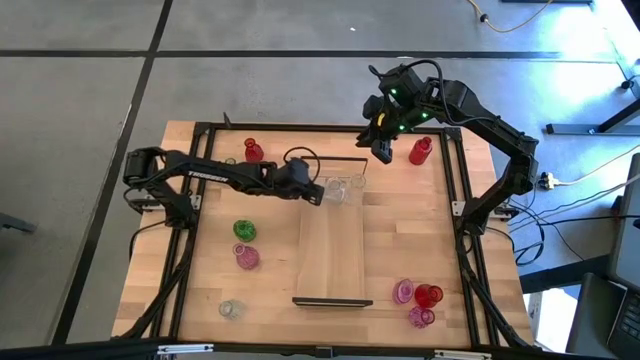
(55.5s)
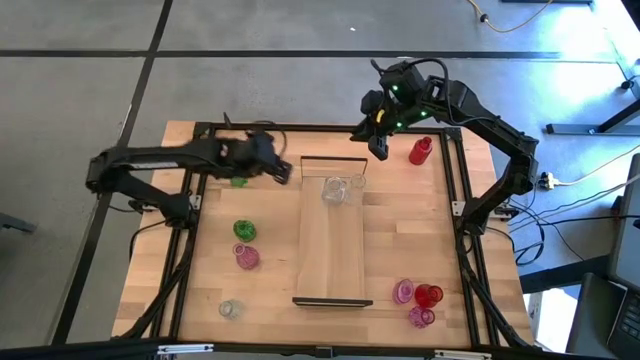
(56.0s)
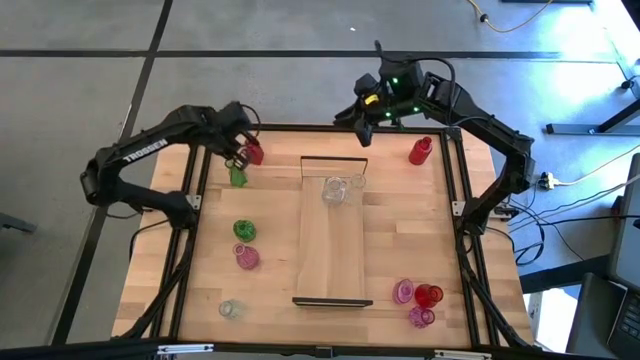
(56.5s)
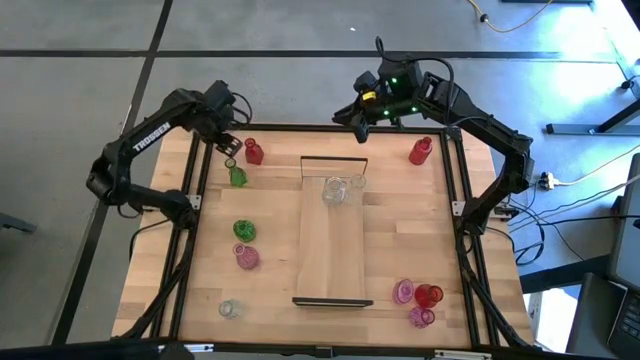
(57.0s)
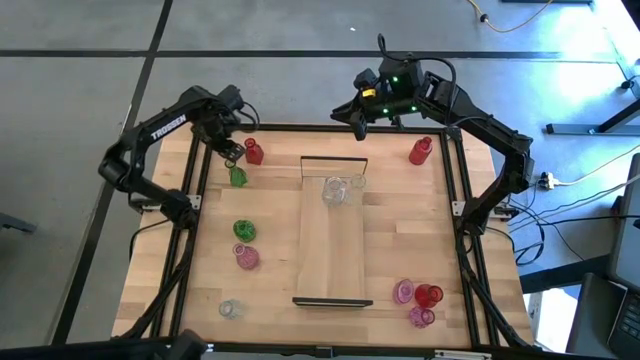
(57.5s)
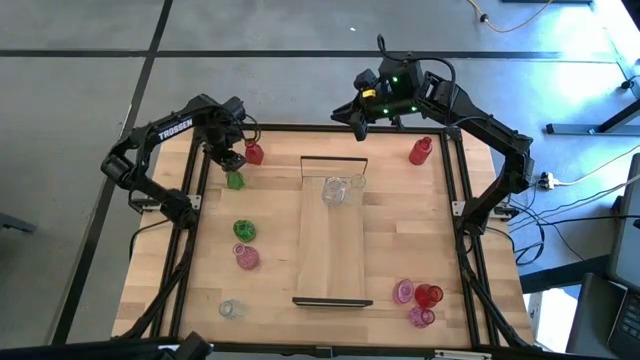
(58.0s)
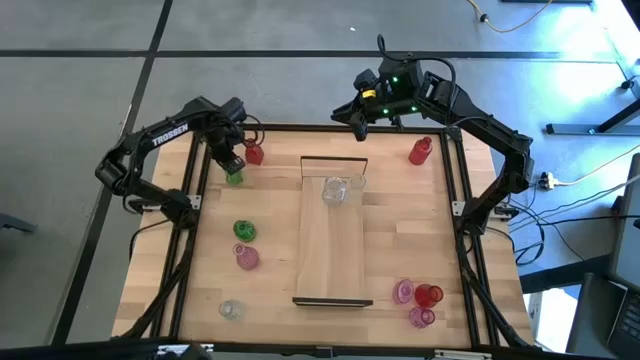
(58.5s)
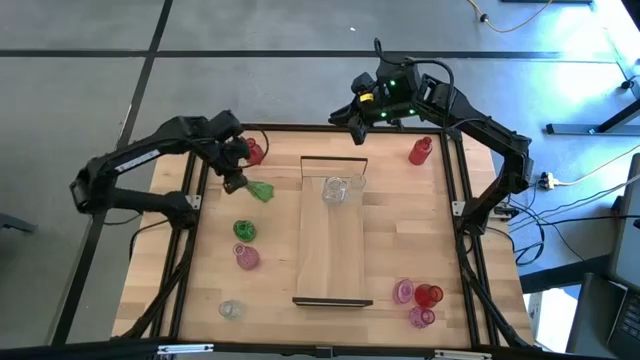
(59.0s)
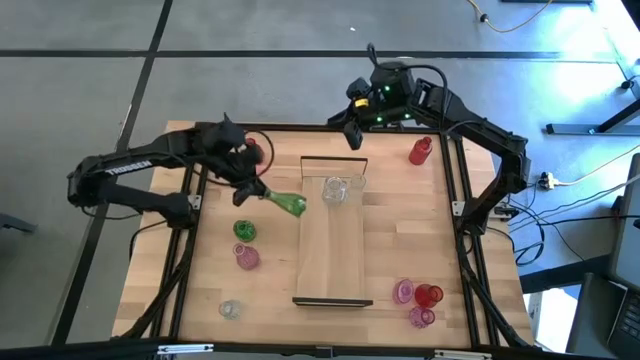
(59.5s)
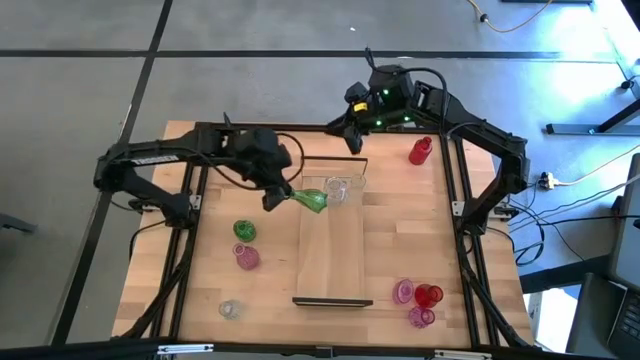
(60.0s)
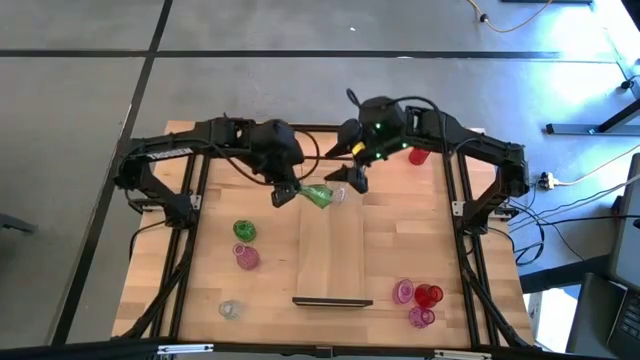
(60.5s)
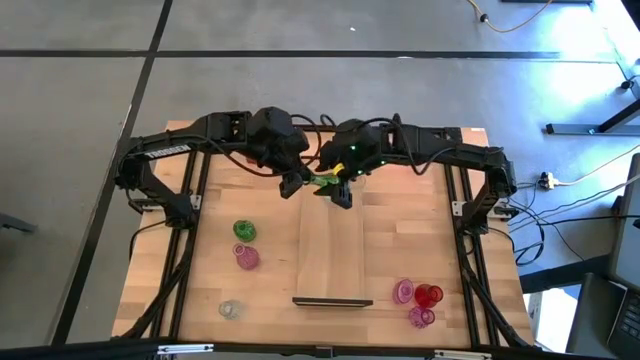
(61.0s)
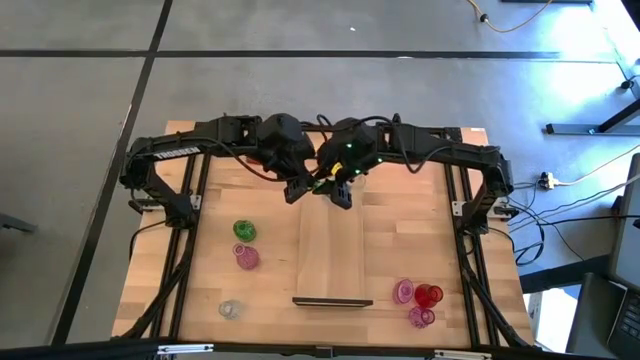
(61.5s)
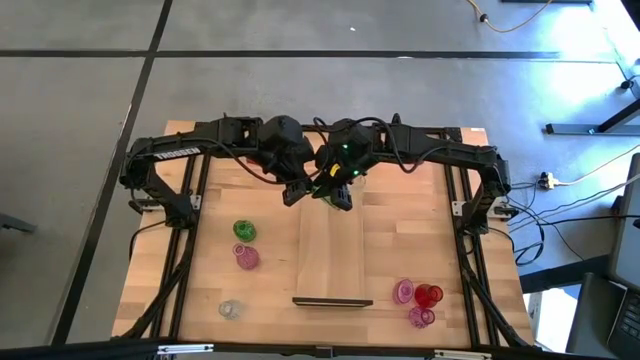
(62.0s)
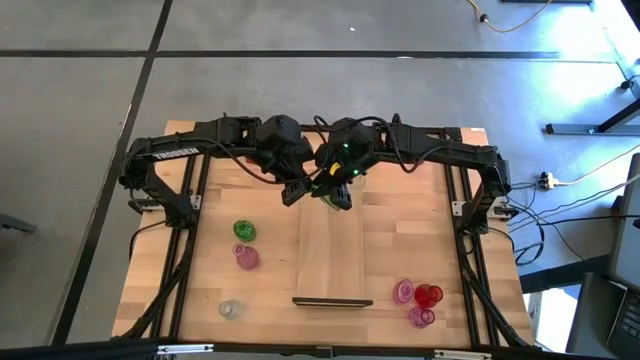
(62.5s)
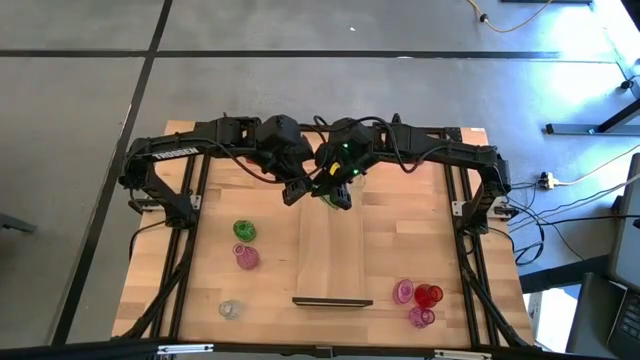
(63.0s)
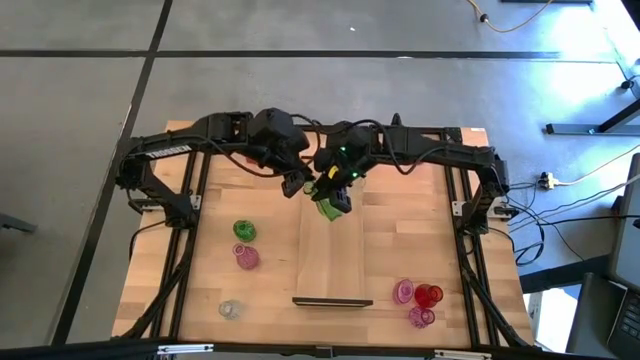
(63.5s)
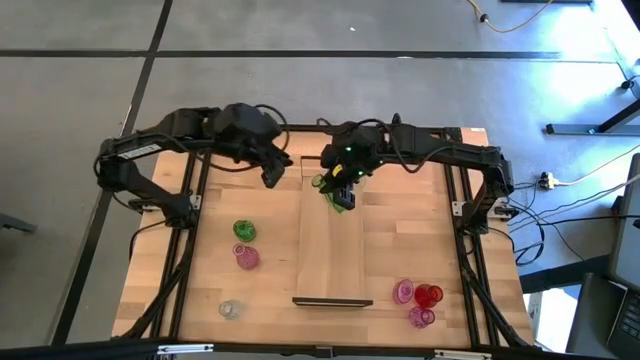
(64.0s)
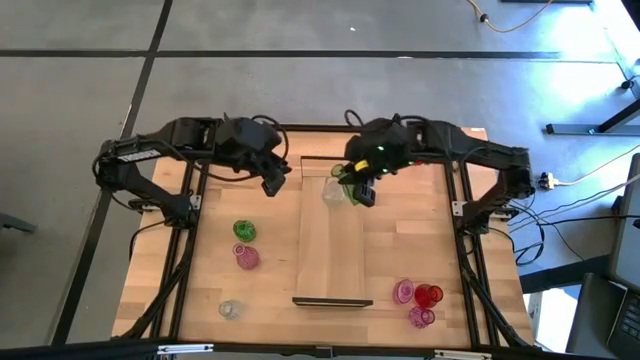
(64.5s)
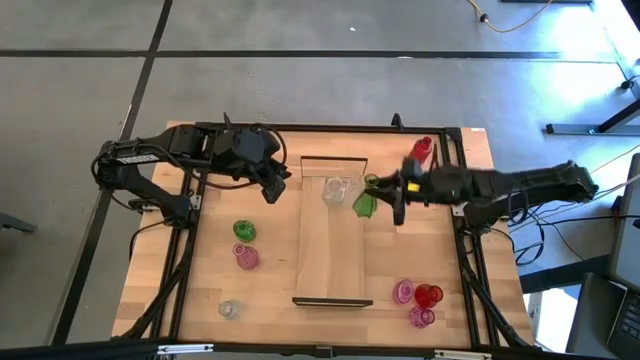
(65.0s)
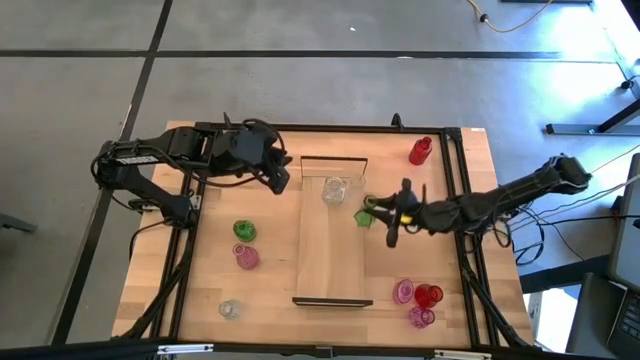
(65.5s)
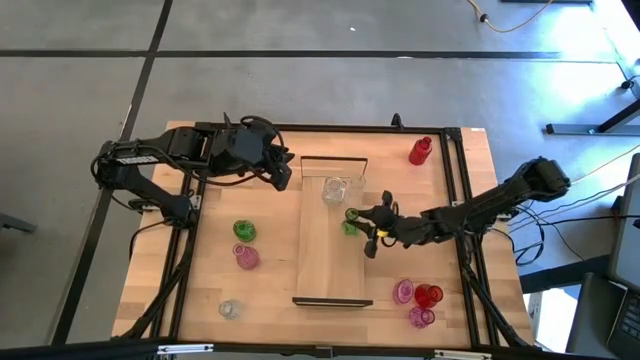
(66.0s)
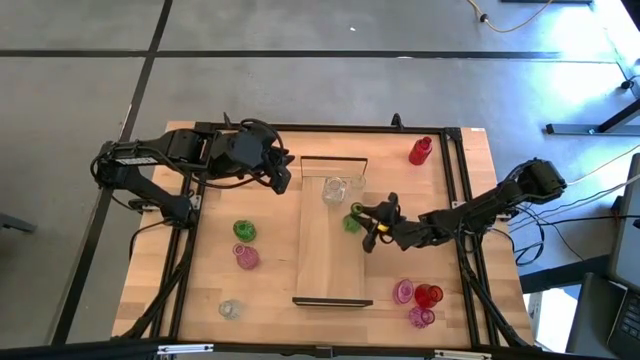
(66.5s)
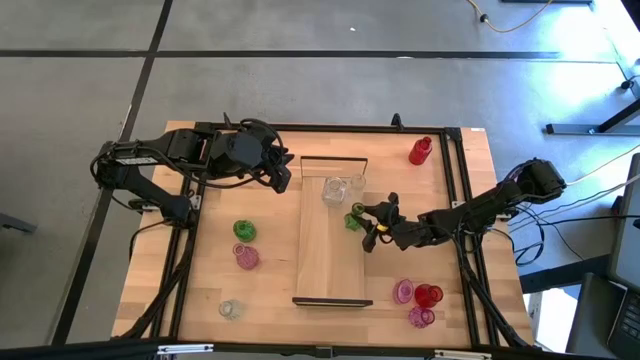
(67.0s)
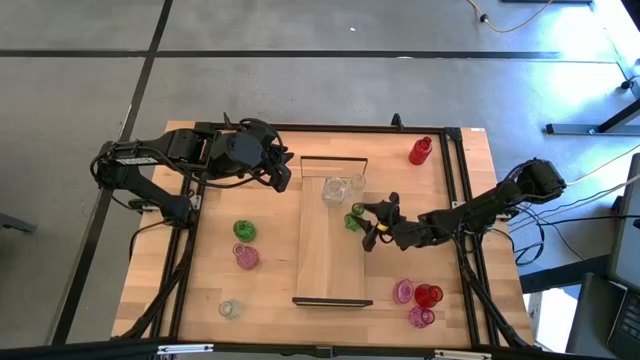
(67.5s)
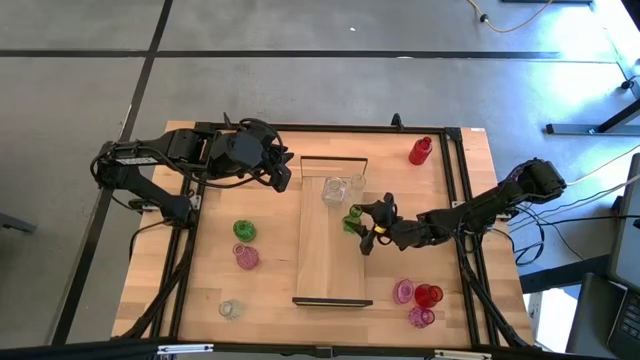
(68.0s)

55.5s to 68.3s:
Task: sort vases onto shelf
Put the top green vase on the shelf

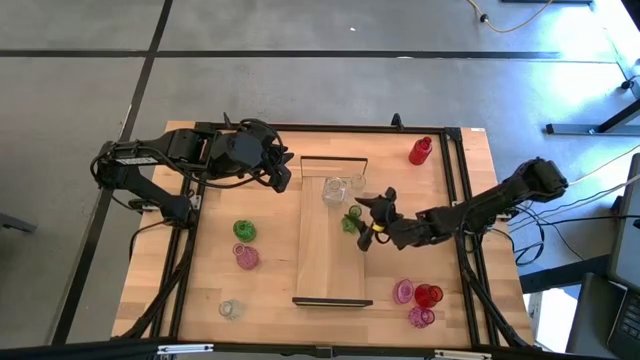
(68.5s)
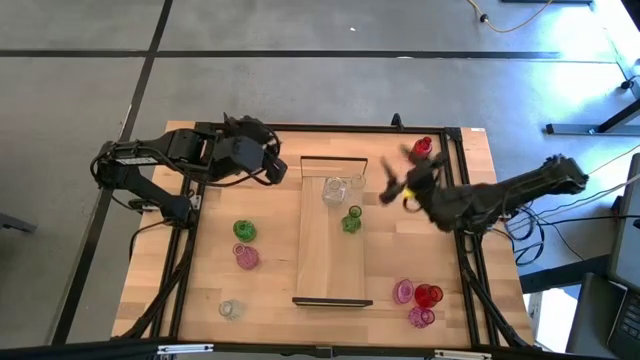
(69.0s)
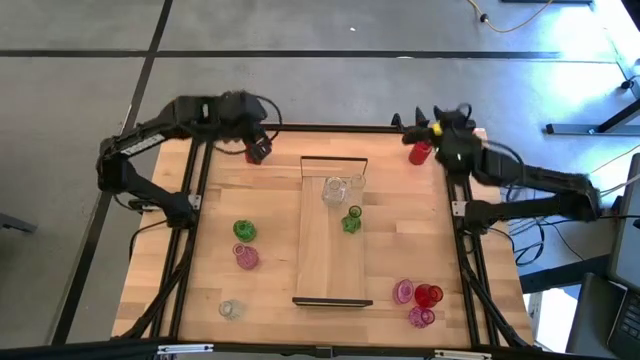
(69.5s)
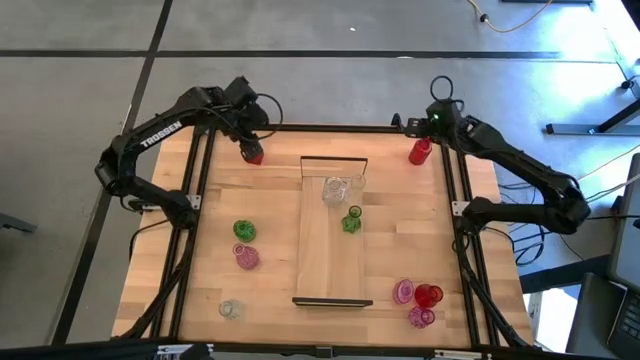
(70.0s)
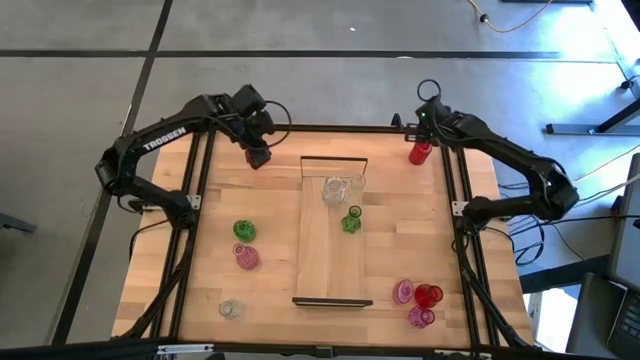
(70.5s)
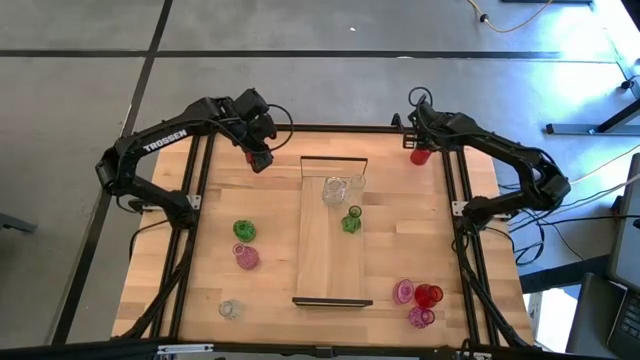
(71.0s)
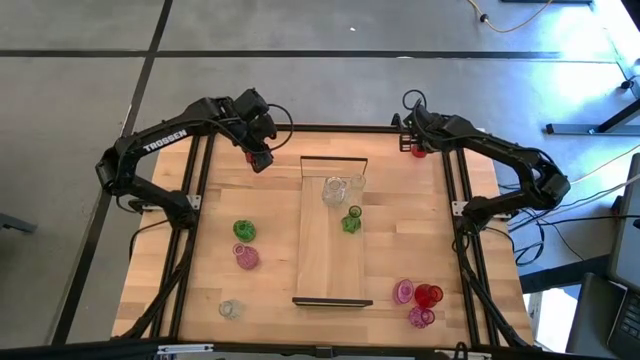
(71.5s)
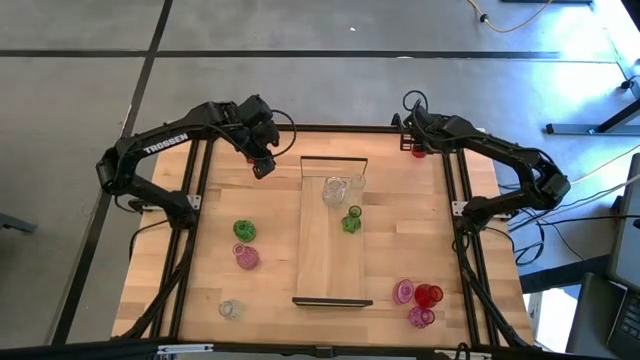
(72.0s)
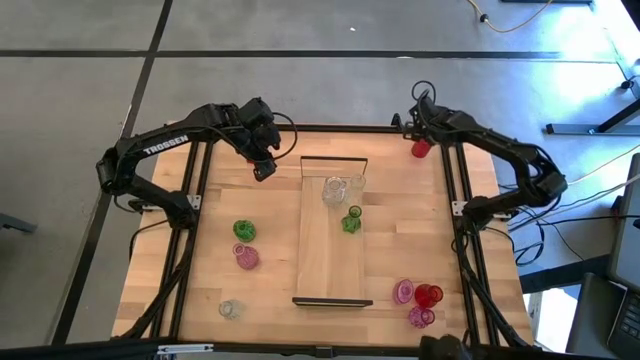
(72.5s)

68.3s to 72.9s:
Put the top right red vase on the shelf

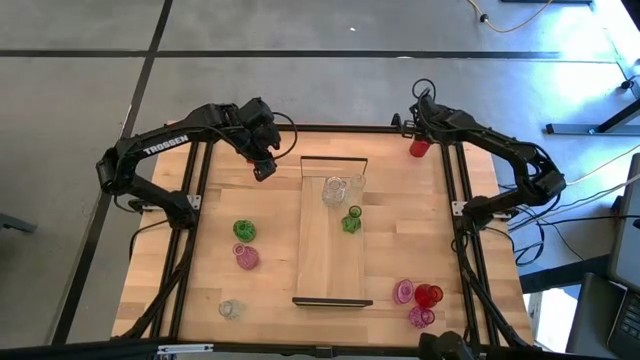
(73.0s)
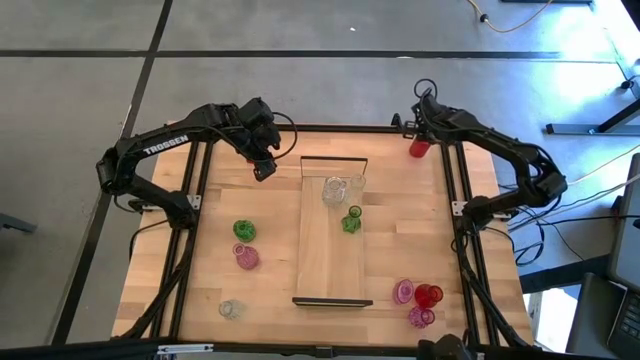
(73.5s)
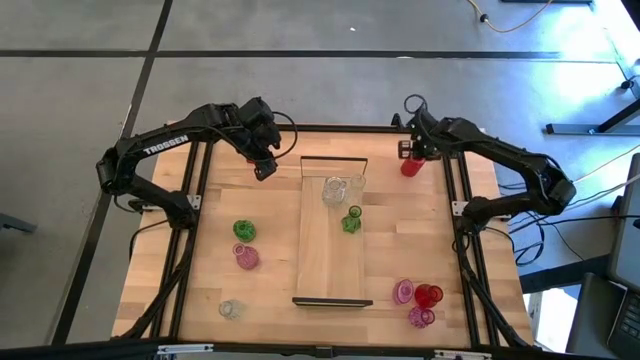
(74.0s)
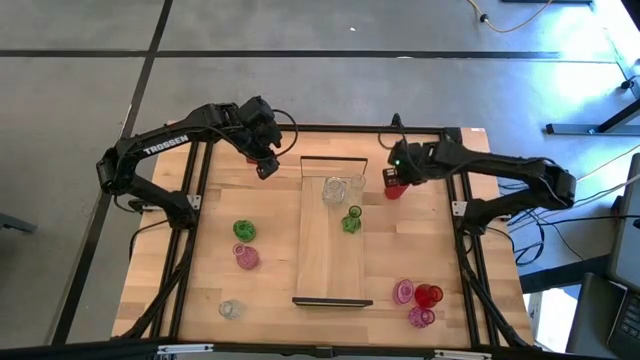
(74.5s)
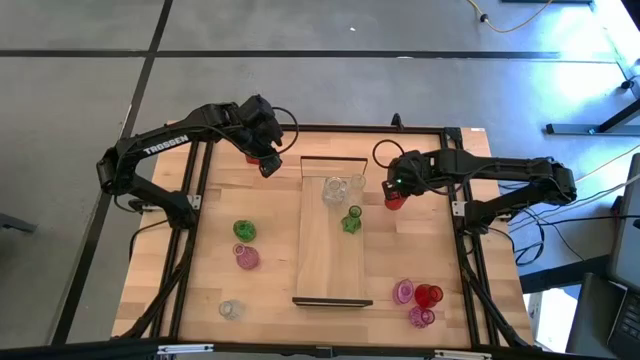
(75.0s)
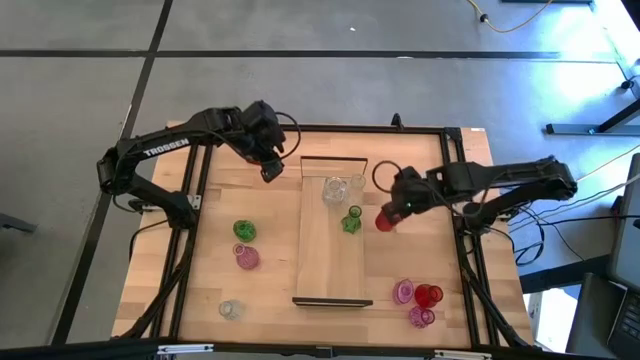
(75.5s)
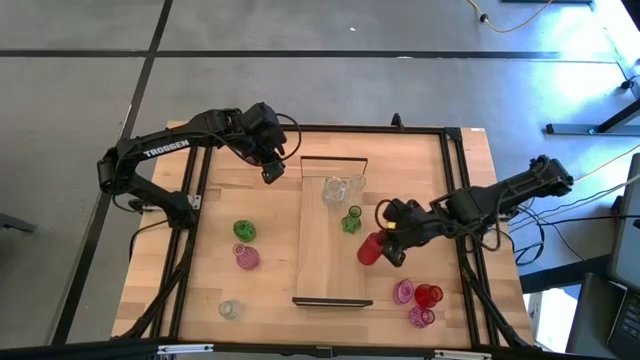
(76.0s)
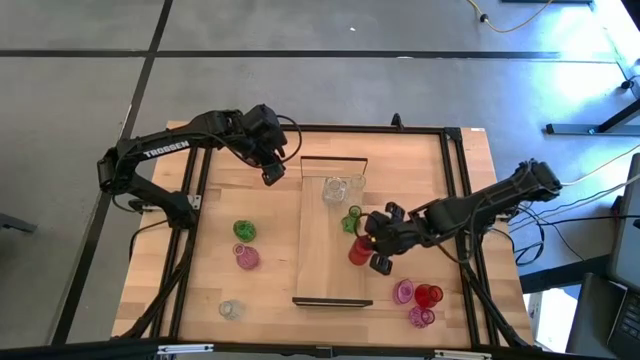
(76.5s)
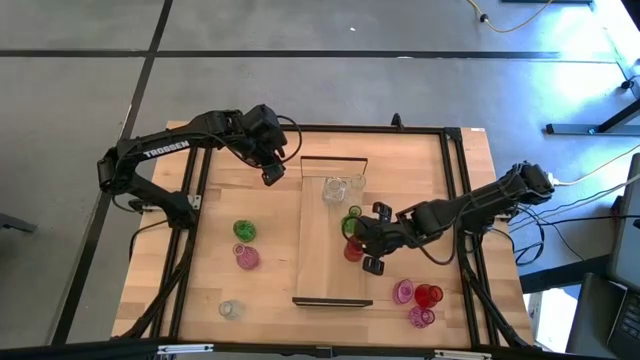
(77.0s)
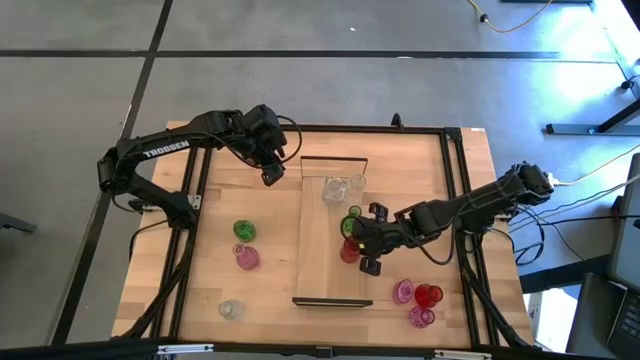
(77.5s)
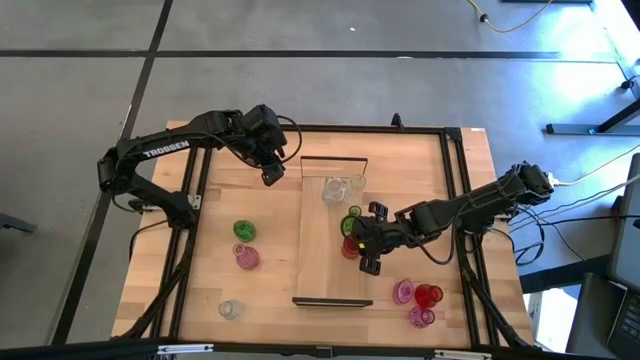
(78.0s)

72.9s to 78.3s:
Put the top right red vase on the shelf
